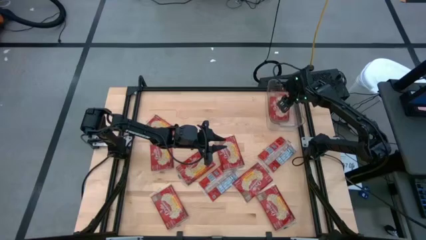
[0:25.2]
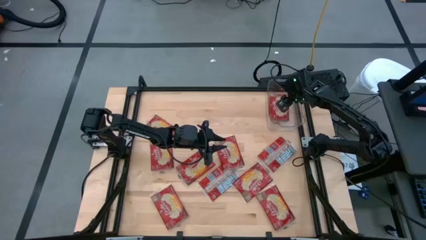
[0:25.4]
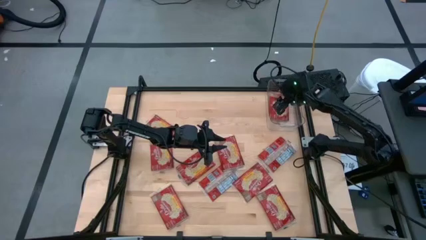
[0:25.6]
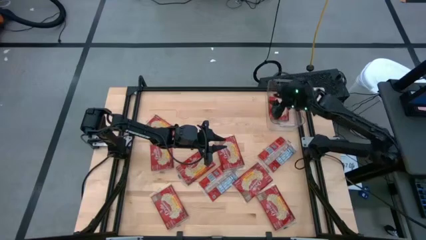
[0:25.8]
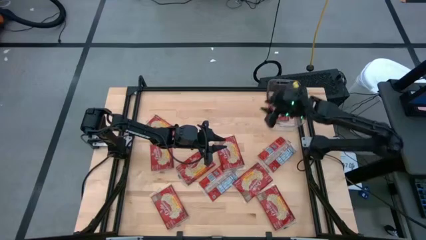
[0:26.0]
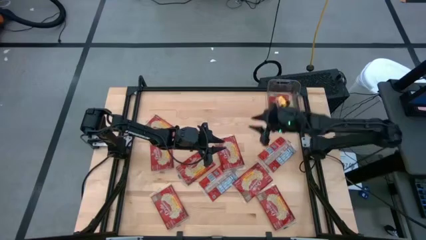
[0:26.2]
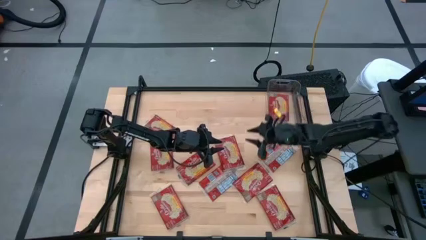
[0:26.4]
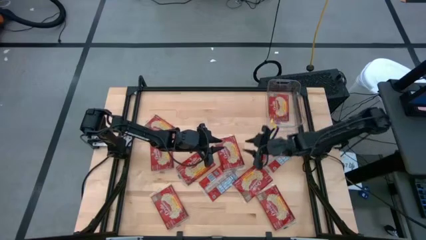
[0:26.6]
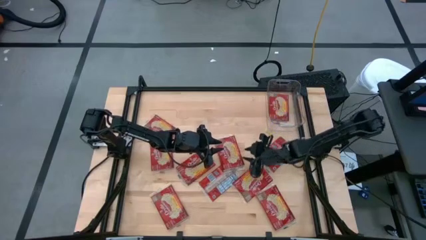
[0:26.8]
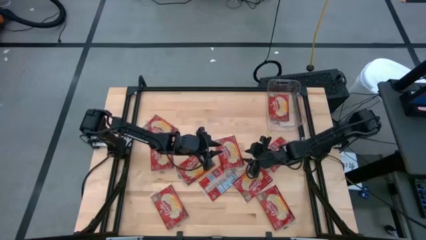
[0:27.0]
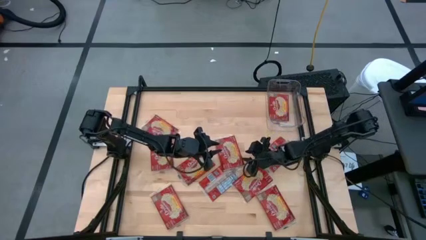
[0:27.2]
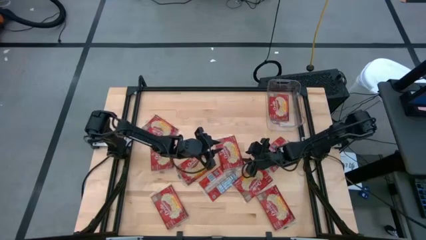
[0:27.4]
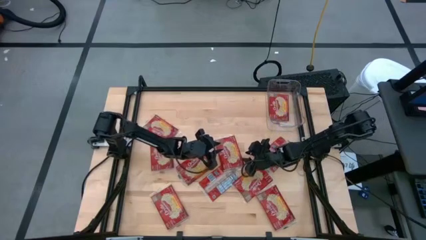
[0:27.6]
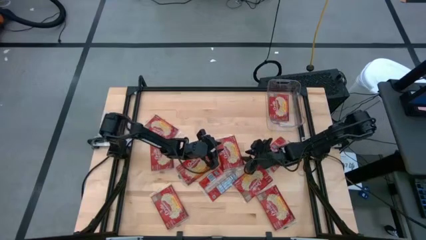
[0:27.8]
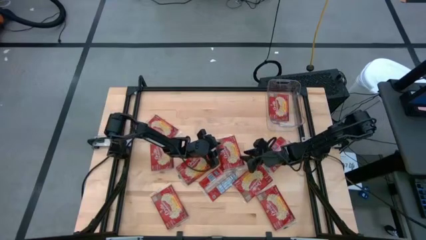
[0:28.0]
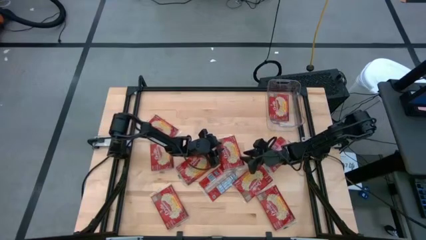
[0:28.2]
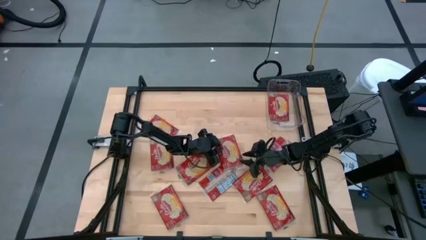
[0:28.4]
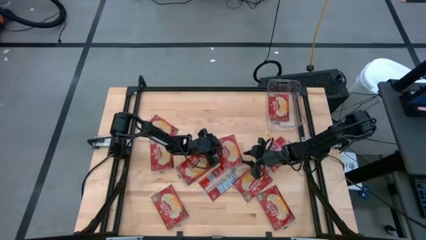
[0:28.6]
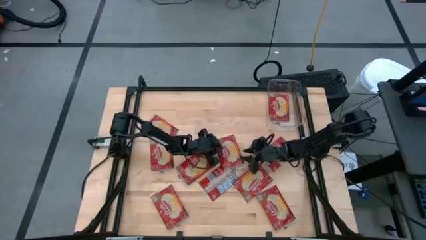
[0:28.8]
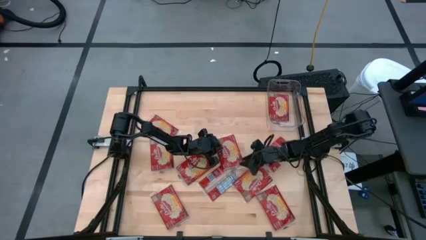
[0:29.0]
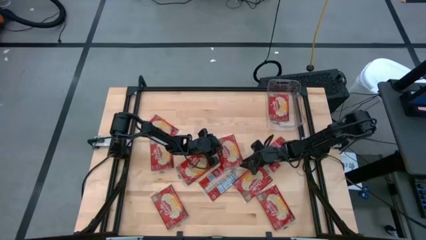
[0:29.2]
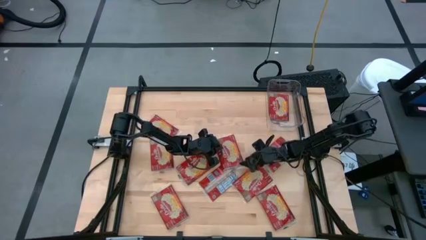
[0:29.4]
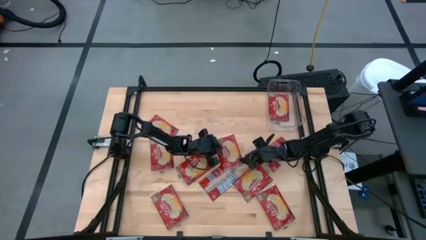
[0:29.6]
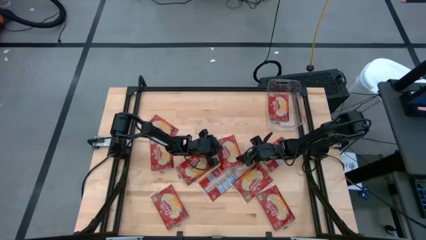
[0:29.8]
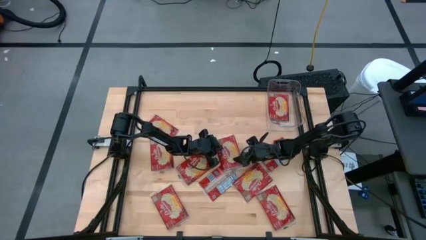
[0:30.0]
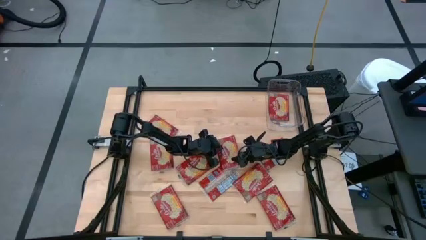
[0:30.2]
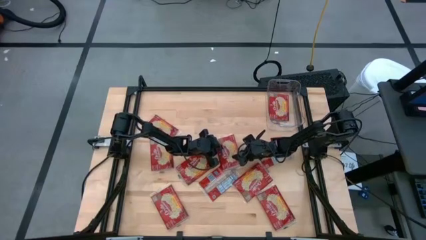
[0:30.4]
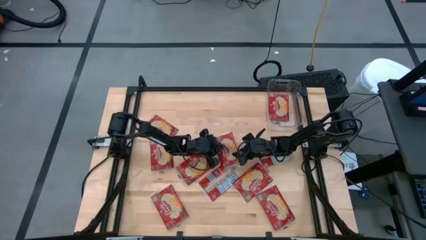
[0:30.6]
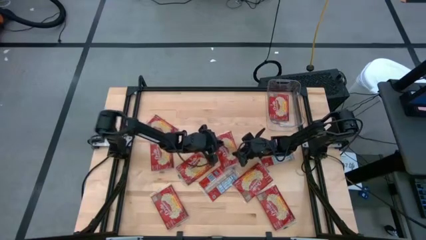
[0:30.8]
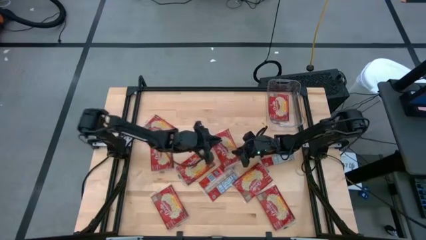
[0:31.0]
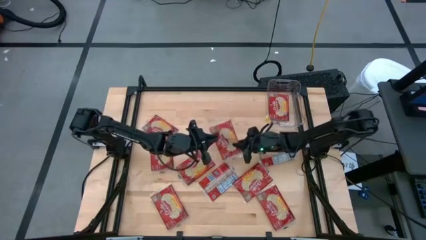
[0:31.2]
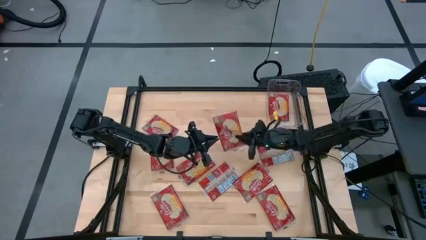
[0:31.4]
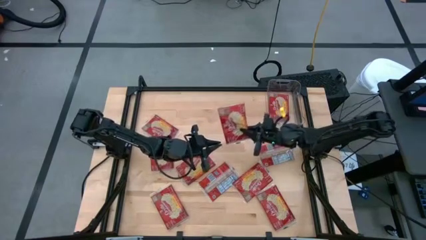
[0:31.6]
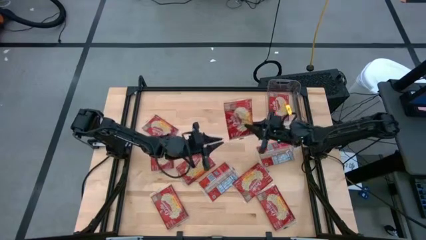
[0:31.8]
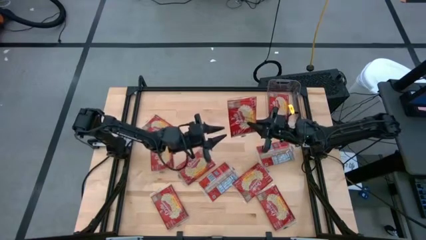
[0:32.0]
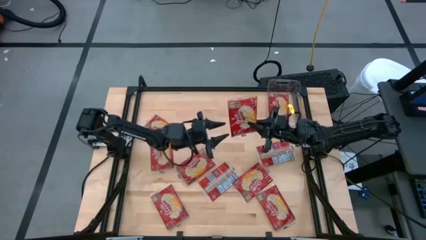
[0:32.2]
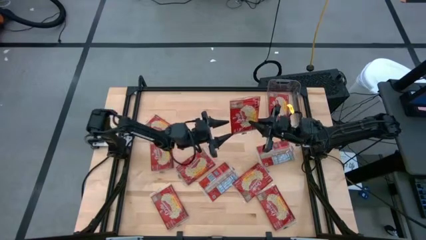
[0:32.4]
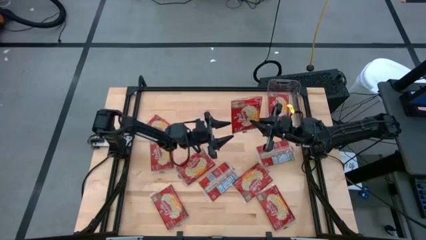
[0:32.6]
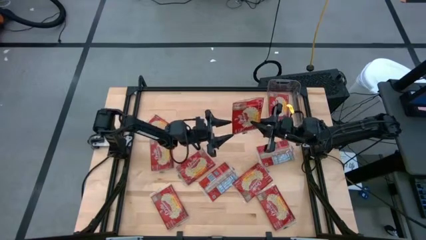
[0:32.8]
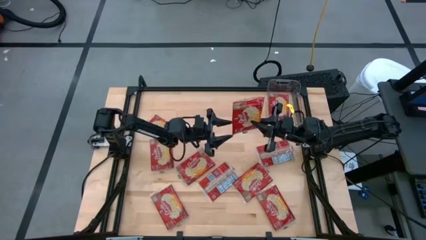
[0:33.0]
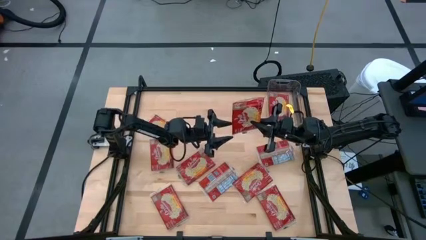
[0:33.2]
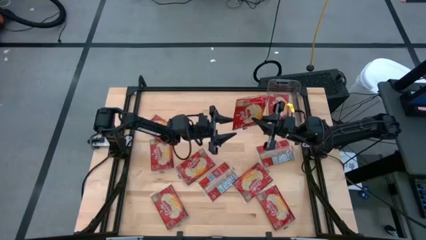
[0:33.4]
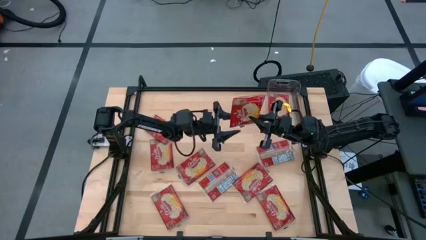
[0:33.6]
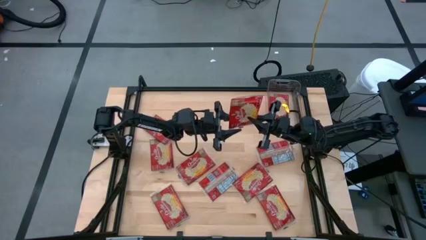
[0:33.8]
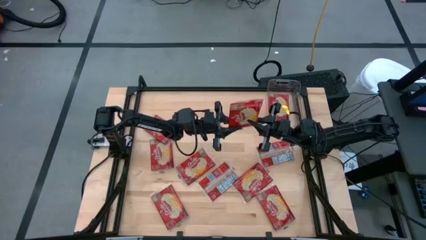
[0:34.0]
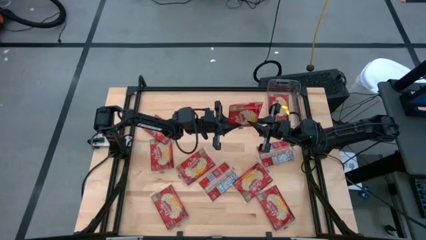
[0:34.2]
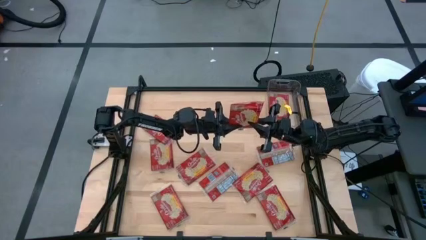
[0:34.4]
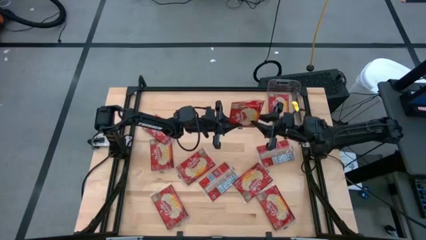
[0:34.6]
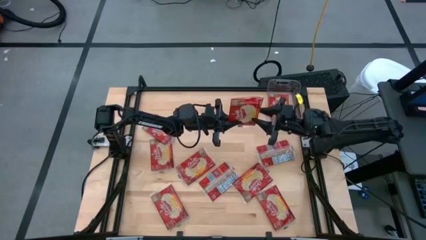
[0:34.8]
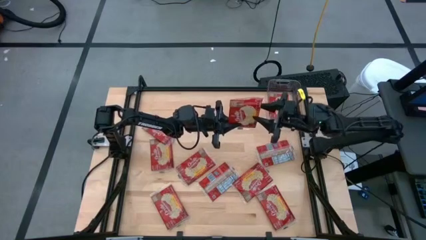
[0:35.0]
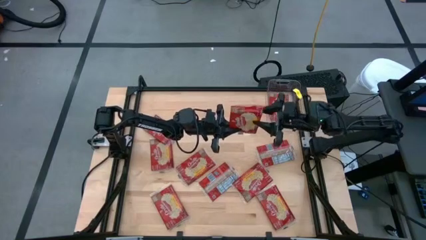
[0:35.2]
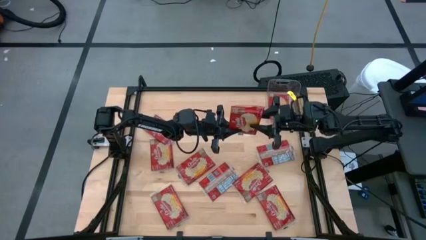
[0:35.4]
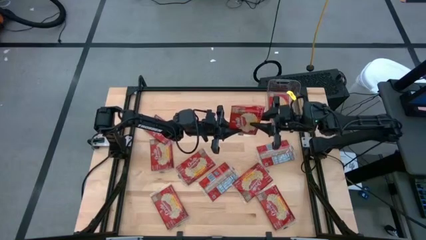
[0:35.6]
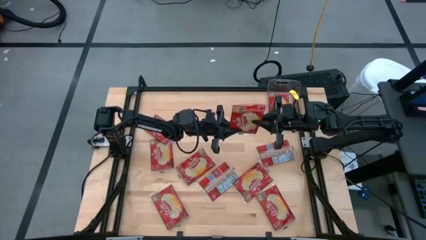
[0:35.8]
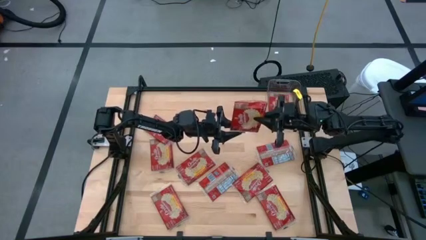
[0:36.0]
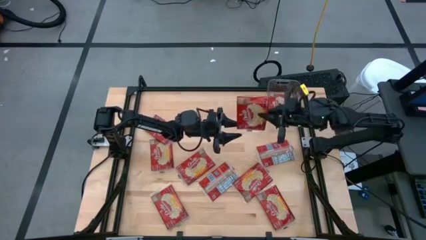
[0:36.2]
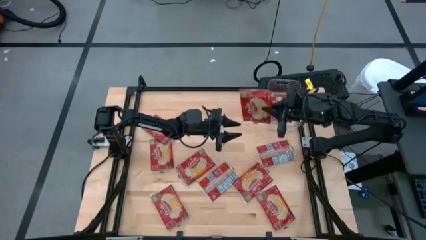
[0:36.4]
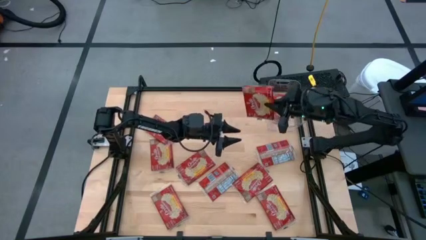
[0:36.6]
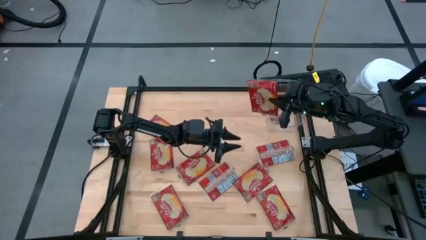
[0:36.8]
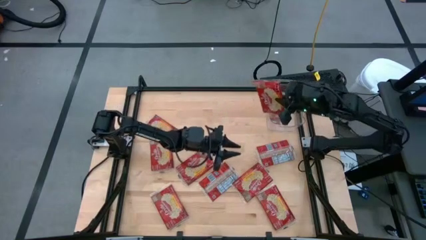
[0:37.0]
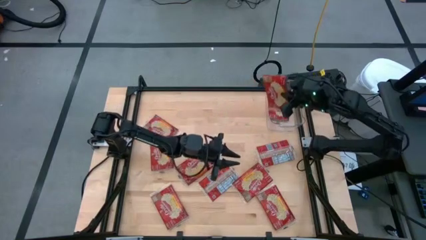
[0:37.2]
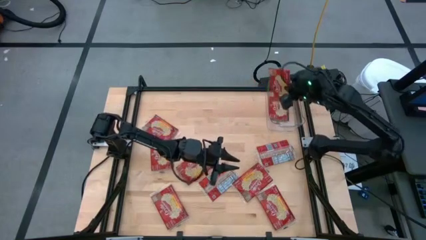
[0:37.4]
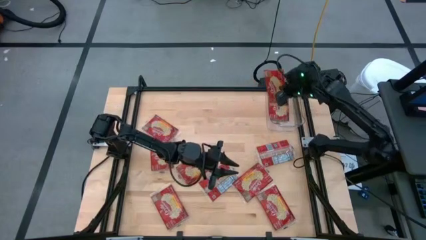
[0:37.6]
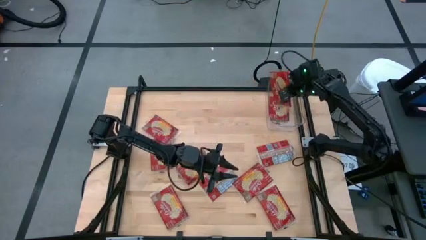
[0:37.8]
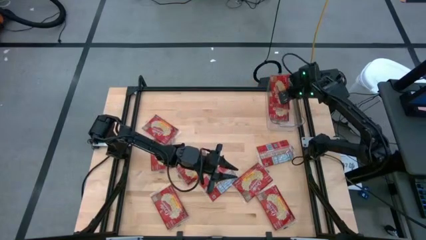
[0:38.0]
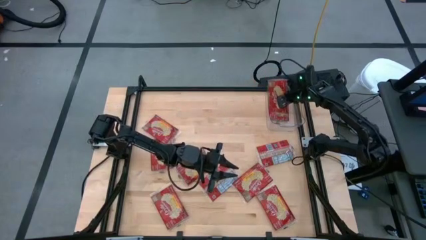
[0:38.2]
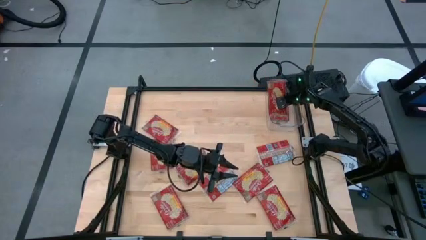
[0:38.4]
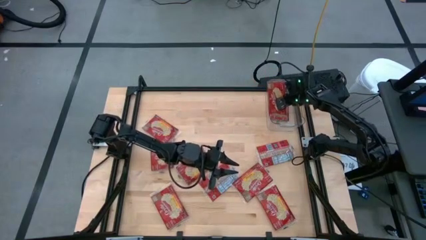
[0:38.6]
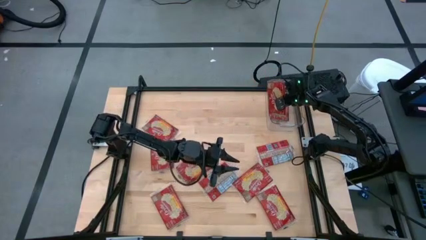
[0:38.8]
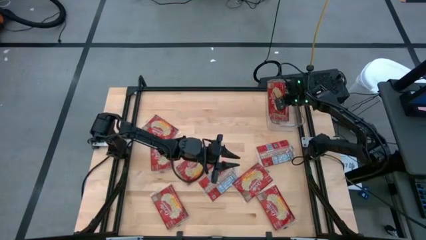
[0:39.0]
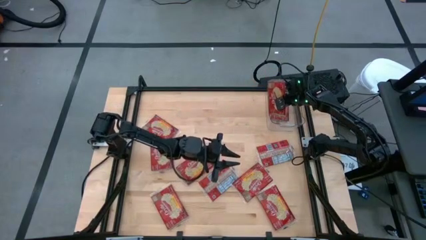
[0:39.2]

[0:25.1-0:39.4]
Task: Sort popcorn bags into baskets
Put the red popcorn bag into the transparent bin

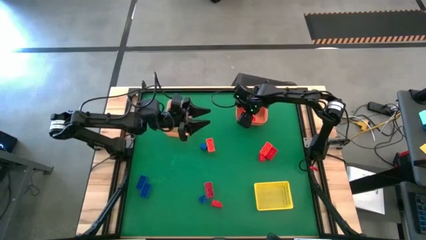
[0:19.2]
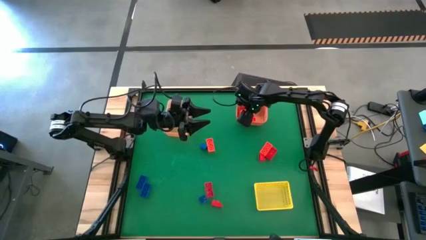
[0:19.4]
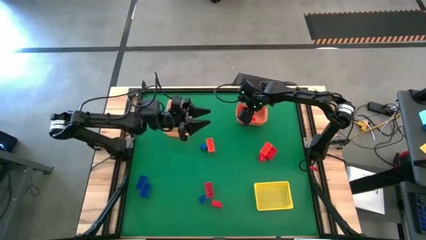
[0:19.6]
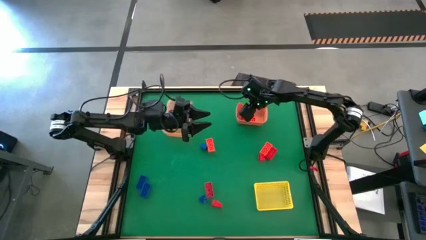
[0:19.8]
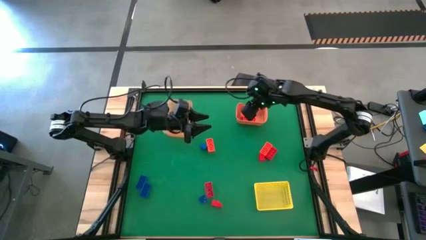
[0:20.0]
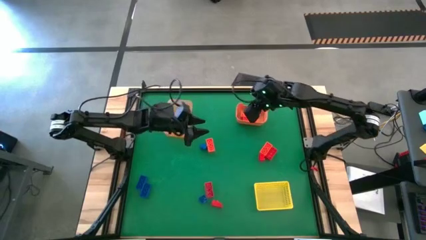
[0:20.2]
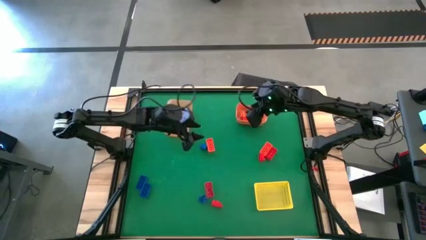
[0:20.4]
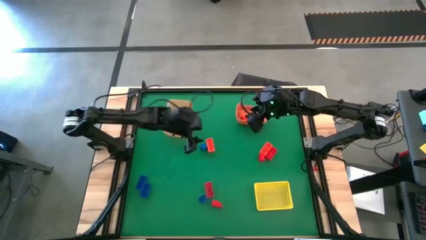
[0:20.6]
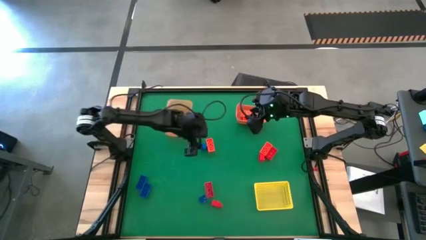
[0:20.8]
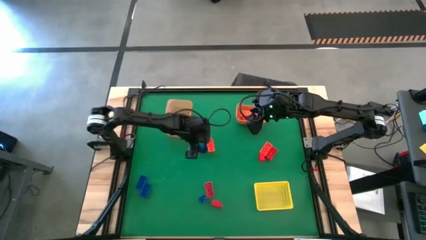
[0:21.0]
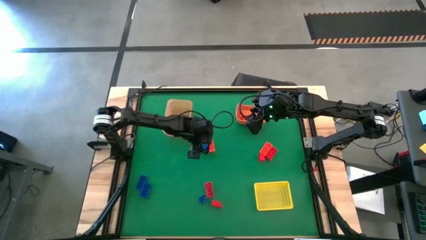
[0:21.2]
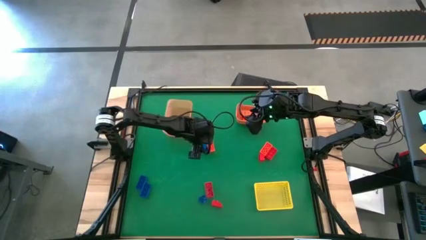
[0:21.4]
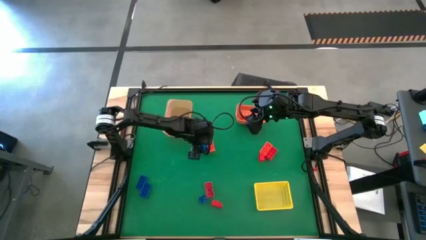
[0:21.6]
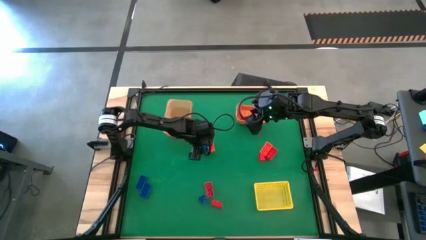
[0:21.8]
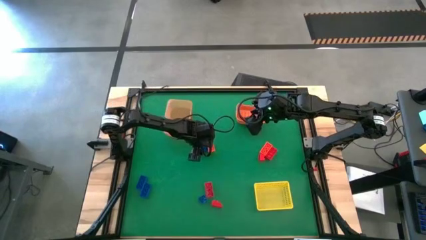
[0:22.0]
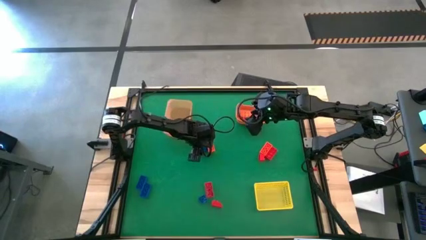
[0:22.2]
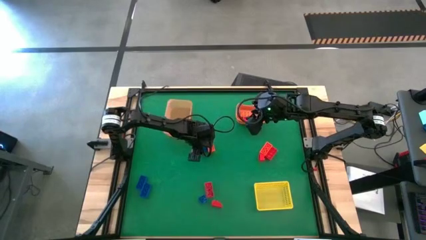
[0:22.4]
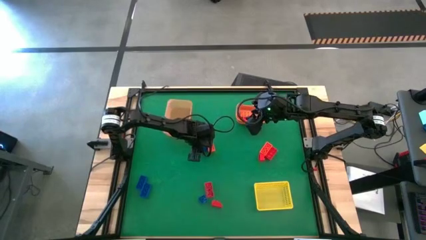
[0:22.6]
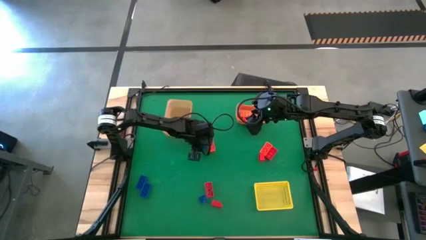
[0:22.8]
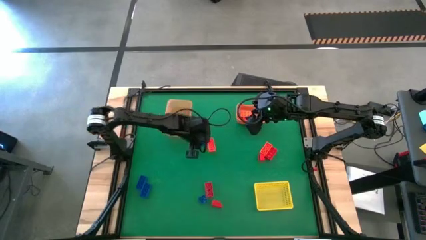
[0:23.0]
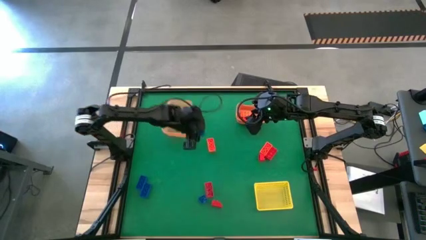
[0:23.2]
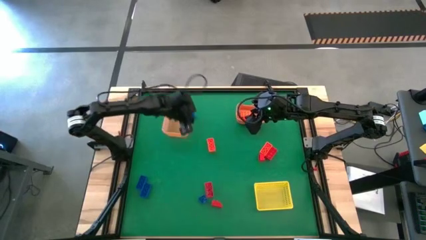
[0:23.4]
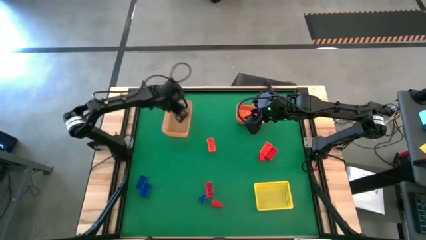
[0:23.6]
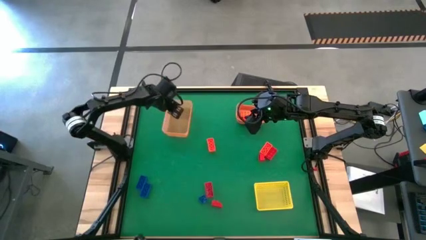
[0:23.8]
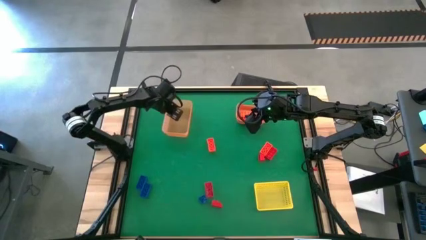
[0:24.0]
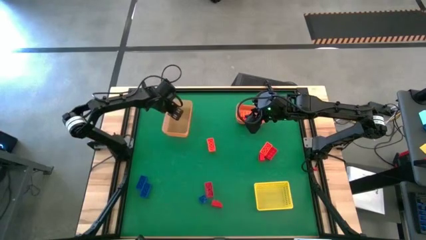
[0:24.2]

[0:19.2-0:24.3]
Task: Sort & place blocks by color
Put the blue game piece into the light orange bin
